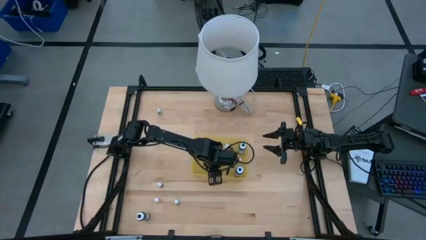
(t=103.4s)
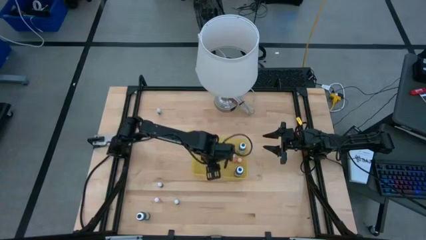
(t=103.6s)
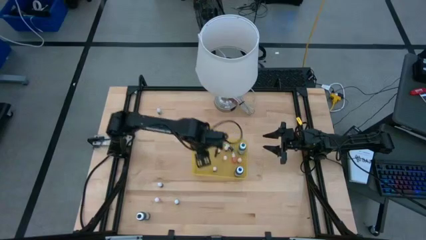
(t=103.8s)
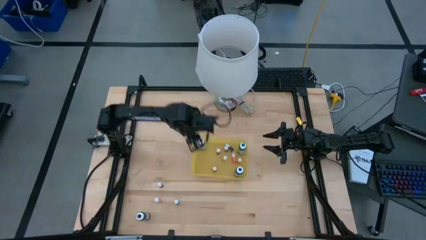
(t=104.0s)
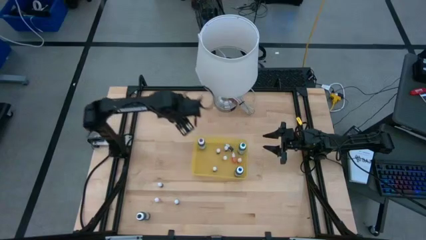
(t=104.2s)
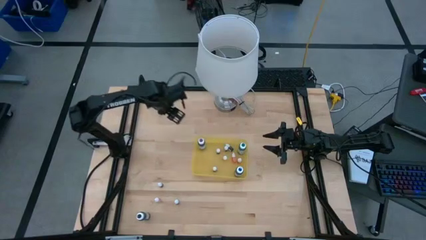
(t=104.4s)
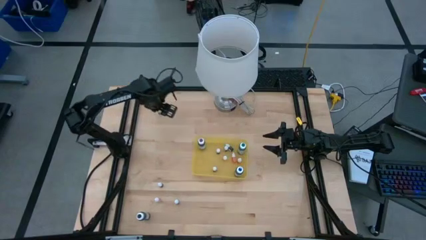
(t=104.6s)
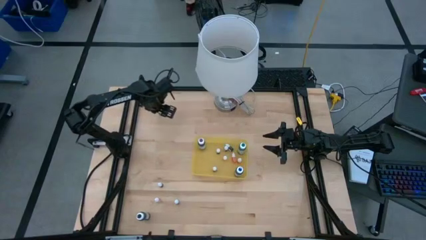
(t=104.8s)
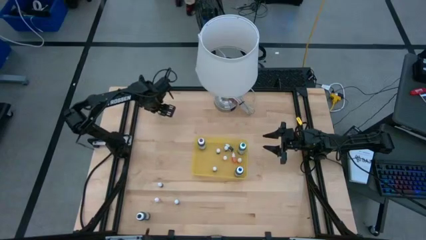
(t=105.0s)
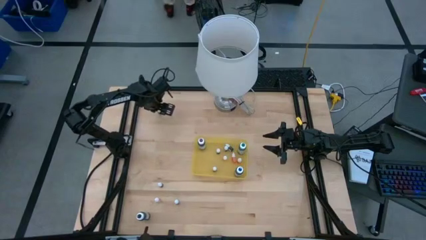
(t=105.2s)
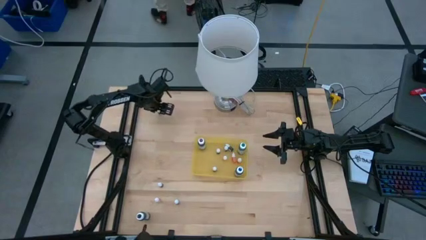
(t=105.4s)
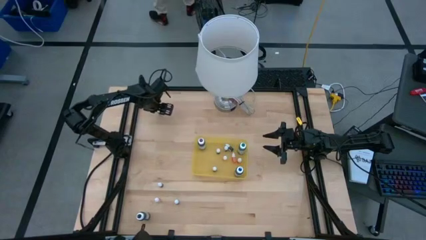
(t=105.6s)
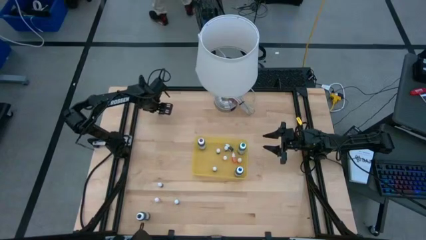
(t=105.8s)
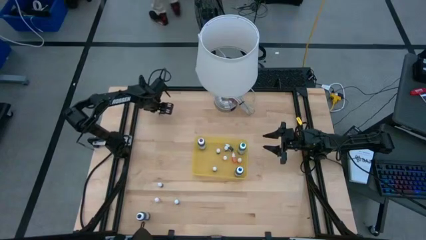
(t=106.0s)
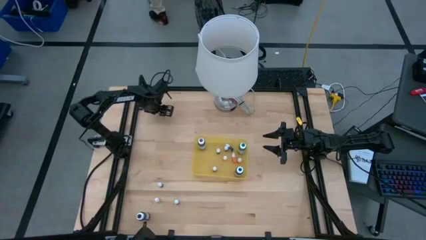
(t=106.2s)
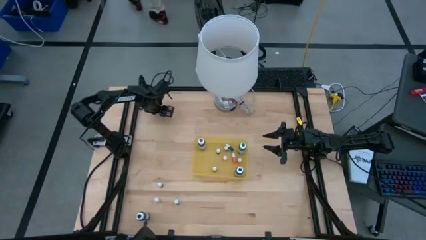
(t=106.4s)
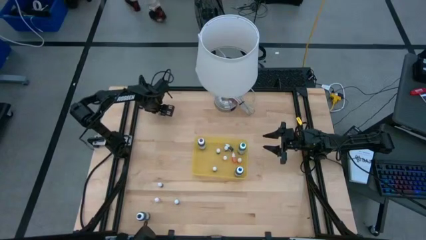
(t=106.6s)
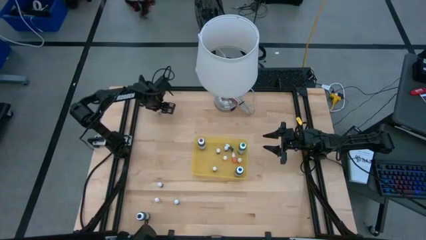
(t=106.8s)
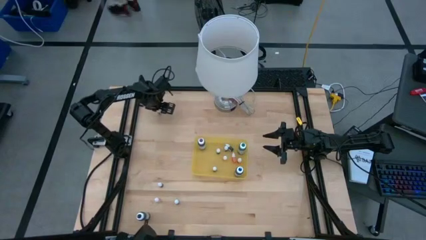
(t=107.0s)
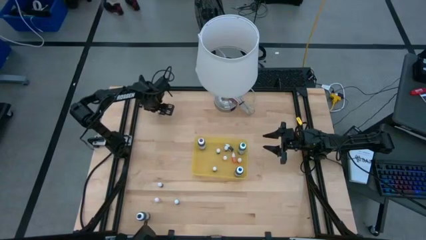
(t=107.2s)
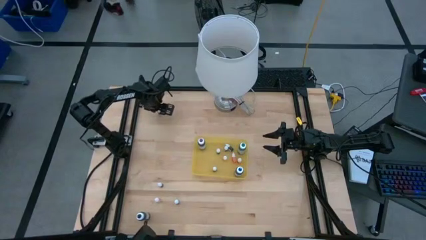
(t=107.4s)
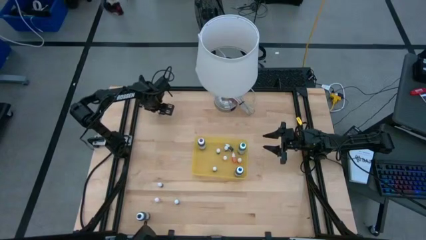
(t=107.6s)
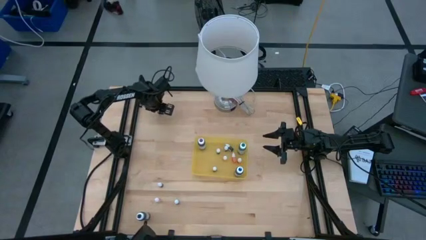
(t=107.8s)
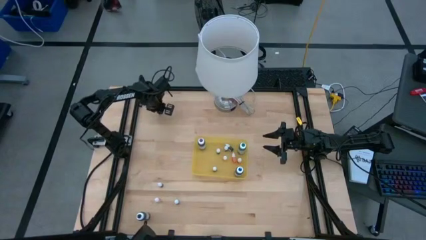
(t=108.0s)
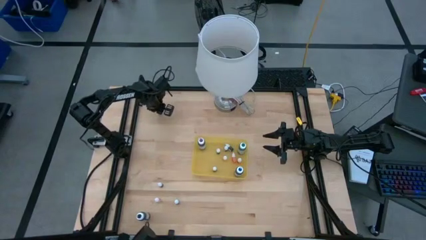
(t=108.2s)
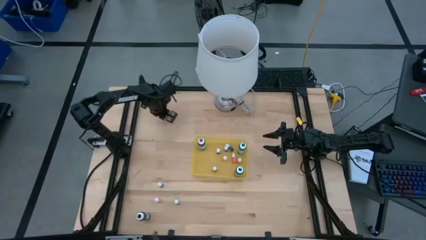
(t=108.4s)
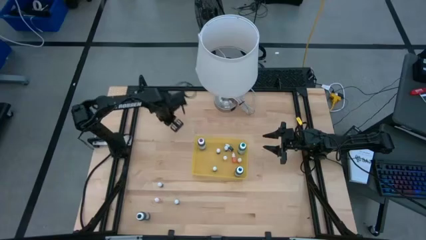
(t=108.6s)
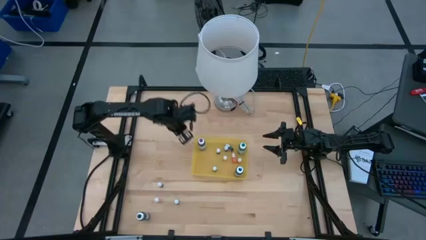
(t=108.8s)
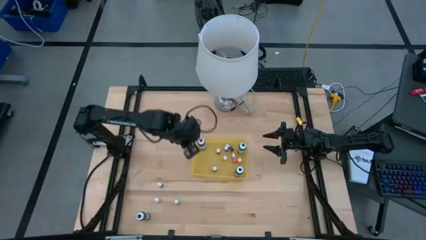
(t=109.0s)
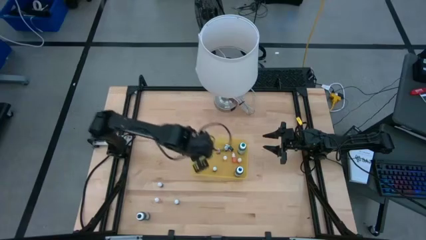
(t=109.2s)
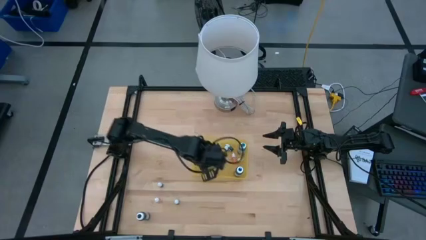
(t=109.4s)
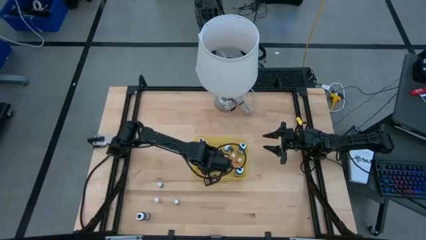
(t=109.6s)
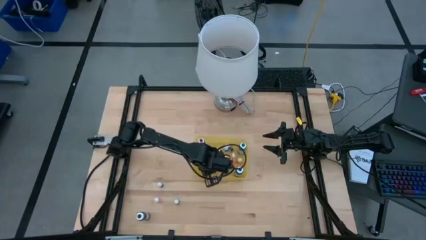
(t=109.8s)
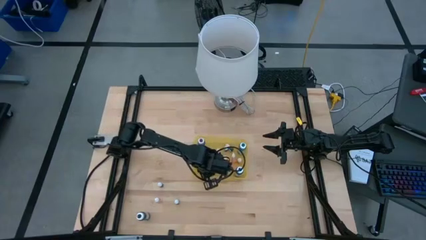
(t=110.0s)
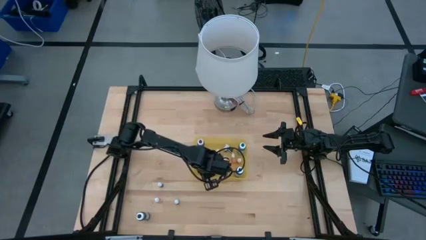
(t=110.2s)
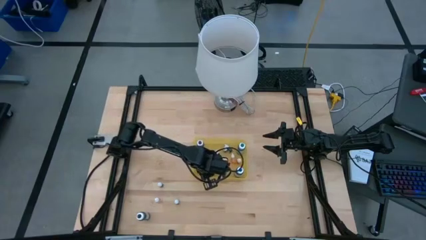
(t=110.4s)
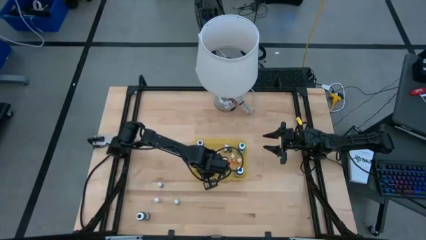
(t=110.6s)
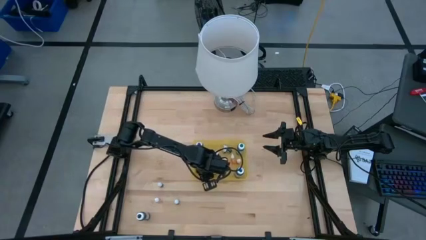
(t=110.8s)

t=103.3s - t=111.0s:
Task: Pick & Place food coloring
Put the black food coloring bottle into the yellow bin

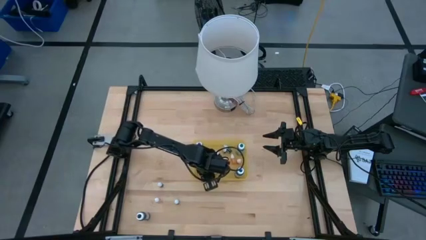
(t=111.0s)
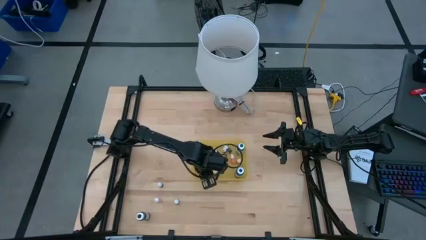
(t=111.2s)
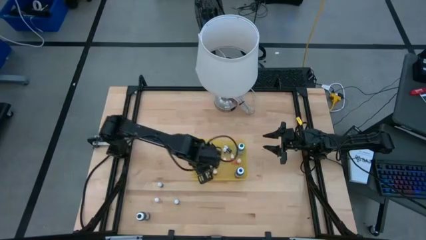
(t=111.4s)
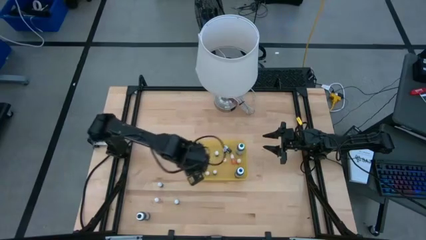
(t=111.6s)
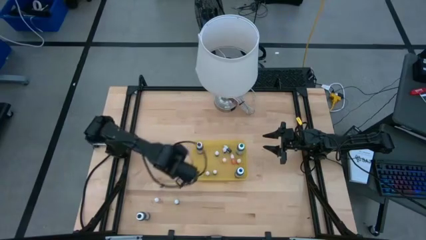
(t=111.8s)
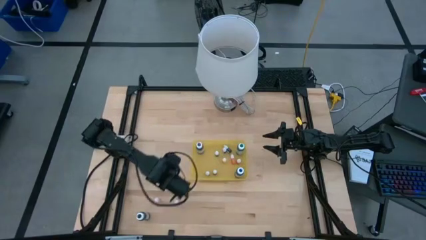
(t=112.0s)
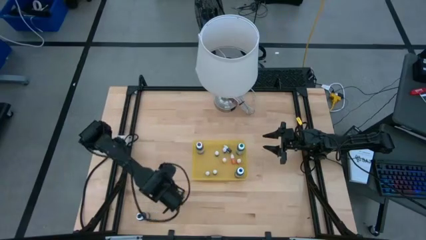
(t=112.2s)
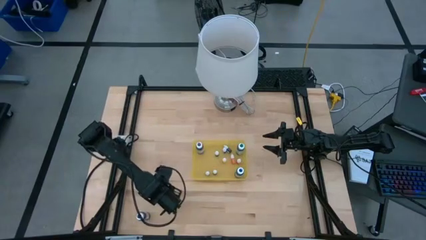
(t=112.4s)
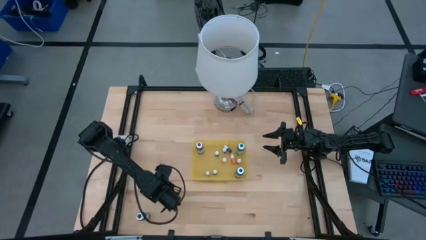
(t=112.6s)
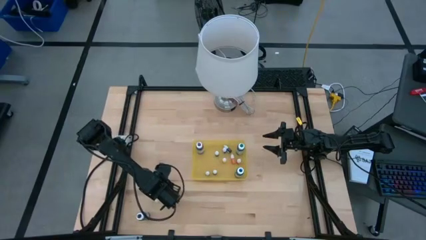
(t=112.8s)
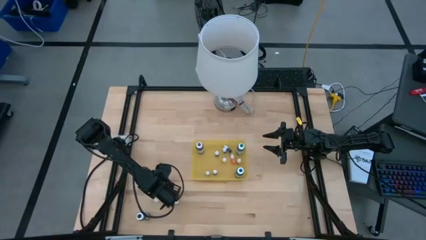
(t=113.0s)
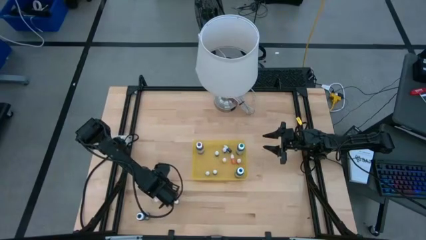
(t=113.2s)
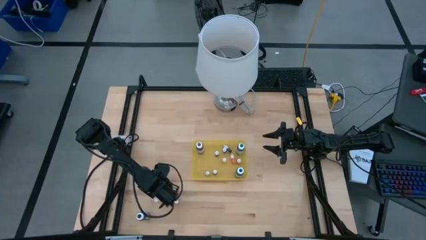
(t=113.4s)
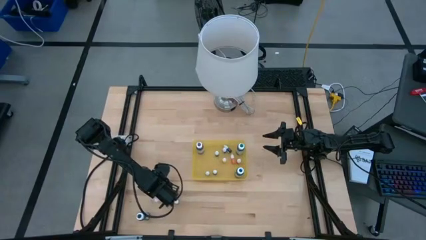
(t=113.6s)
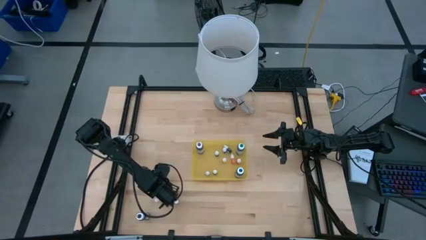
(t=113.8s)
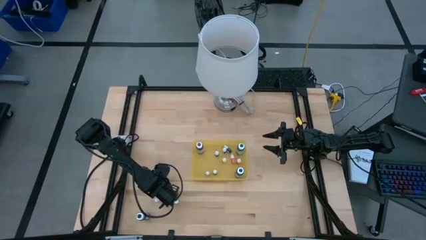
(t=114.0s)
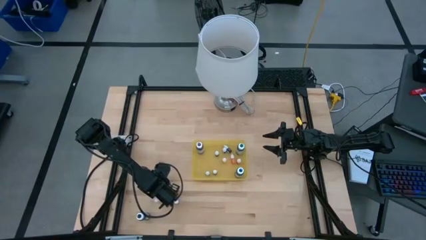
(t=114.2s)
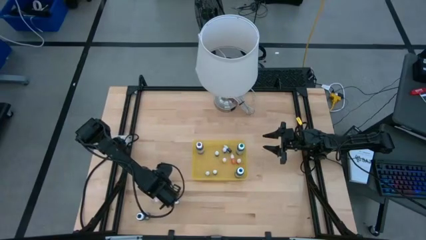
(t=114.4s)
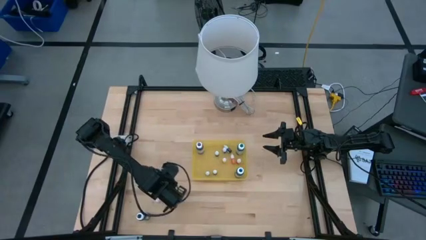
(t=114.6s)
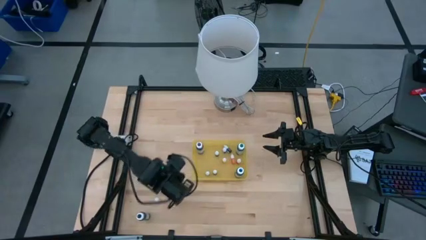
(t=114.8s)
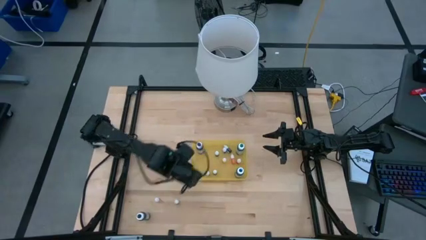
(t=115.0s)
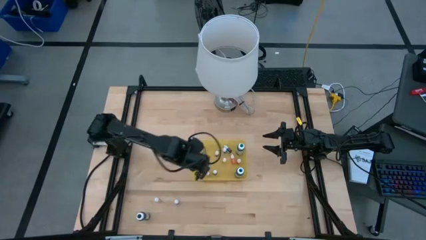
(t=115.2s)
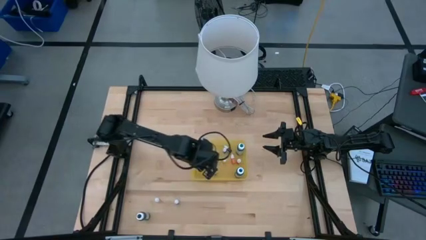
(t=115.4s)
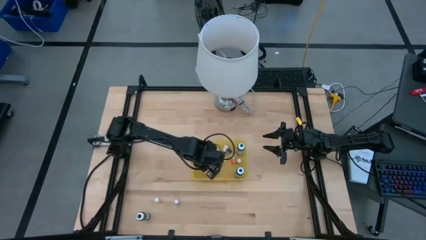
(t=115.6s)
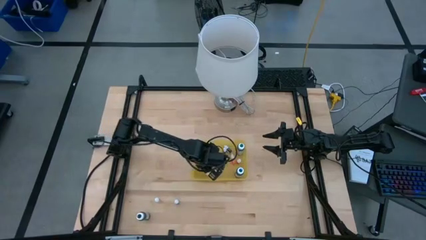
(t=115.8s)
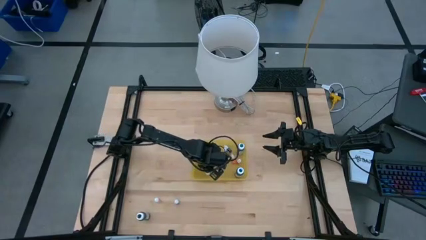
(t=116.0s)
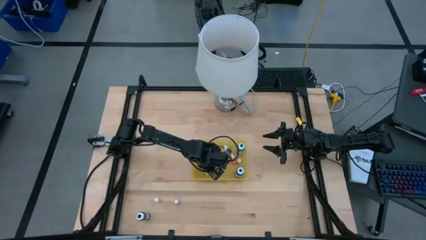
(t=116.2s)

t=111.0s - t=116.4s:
Put the orange food coloring bottle into the yellow bin
